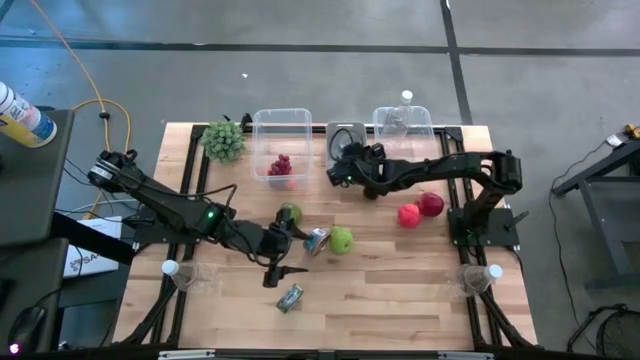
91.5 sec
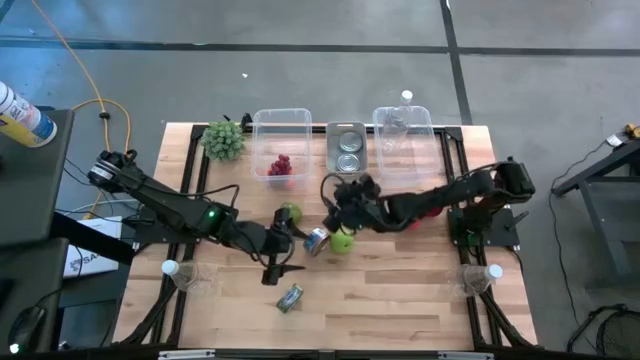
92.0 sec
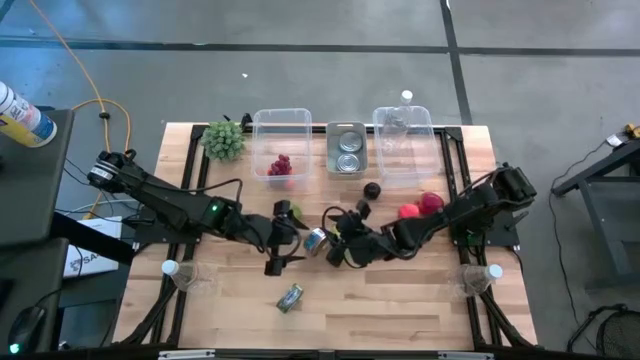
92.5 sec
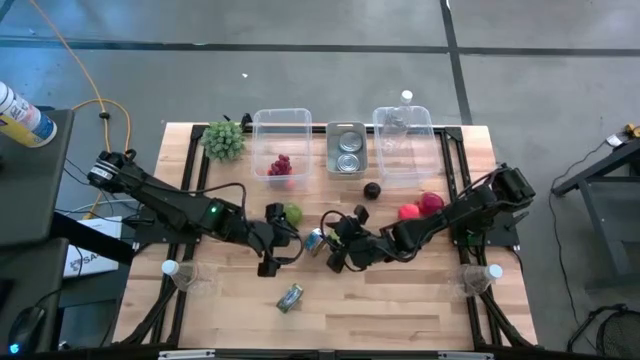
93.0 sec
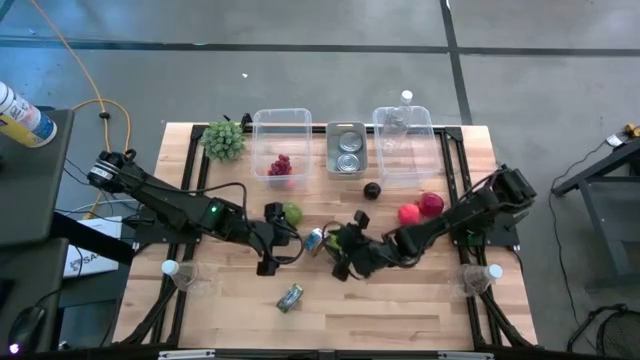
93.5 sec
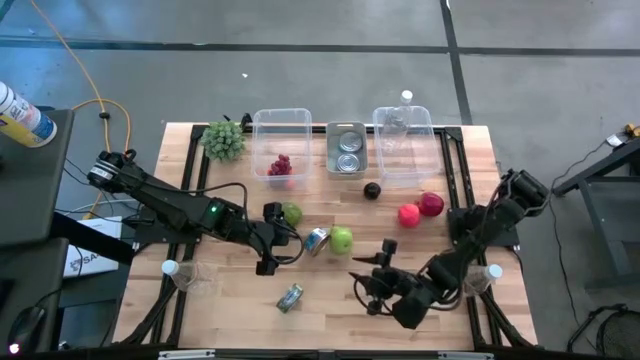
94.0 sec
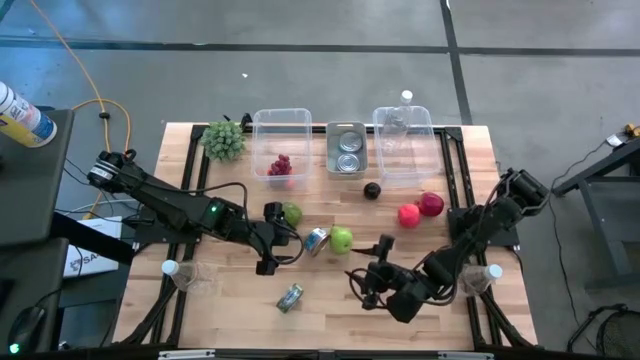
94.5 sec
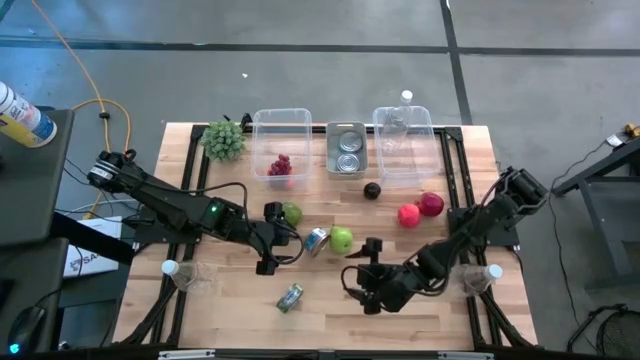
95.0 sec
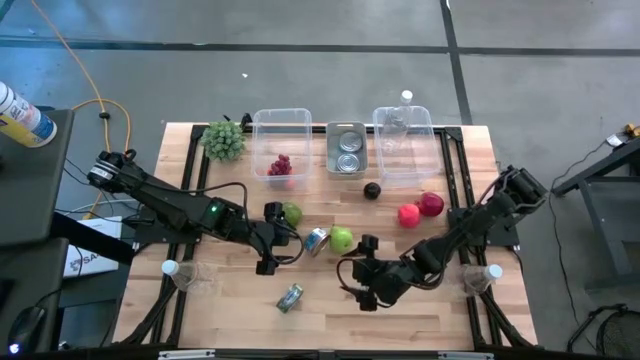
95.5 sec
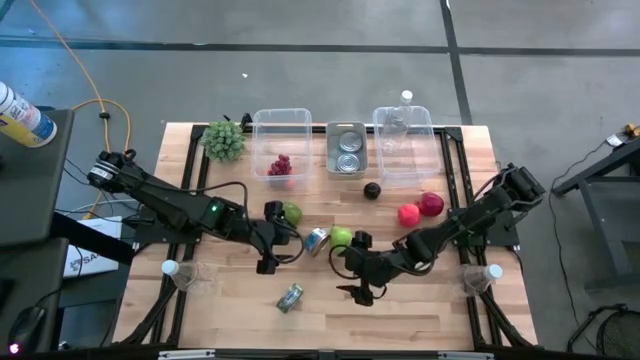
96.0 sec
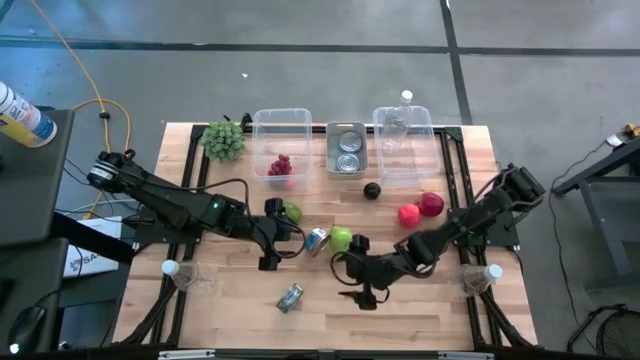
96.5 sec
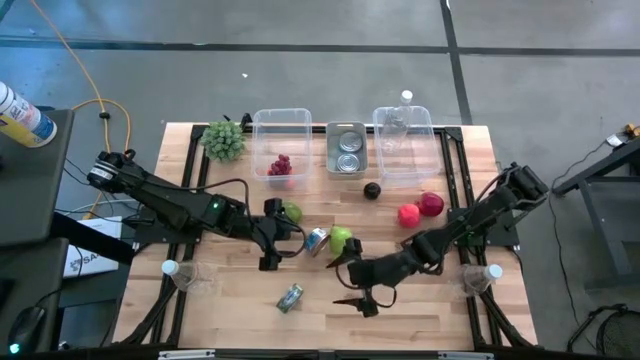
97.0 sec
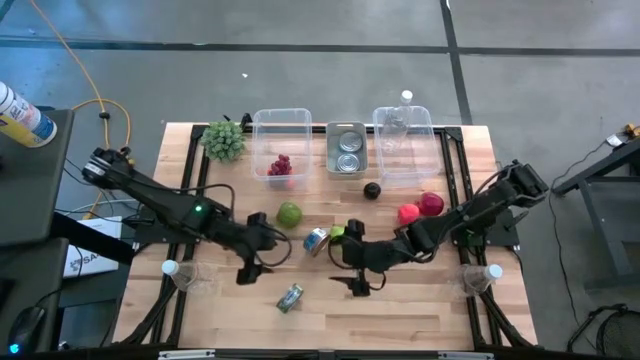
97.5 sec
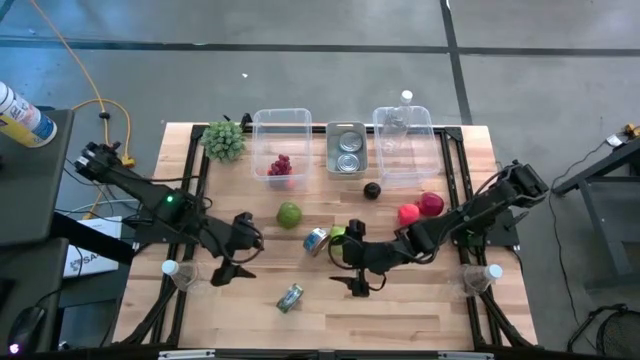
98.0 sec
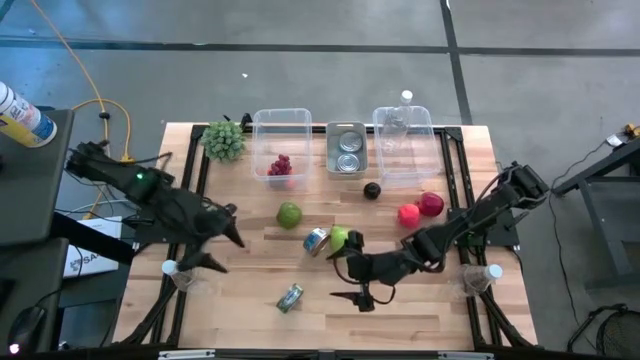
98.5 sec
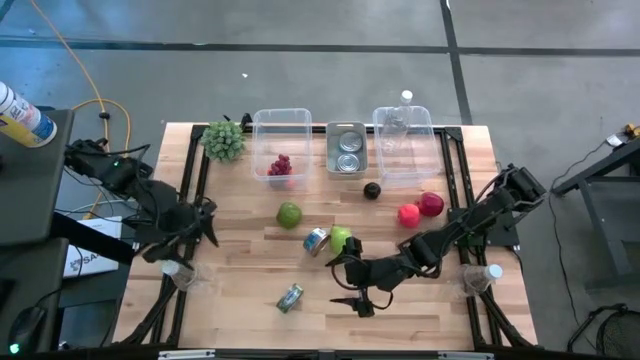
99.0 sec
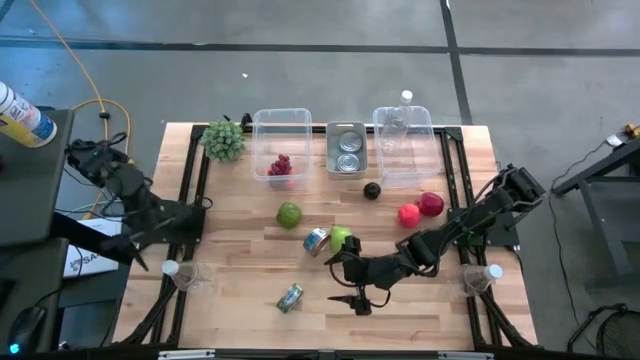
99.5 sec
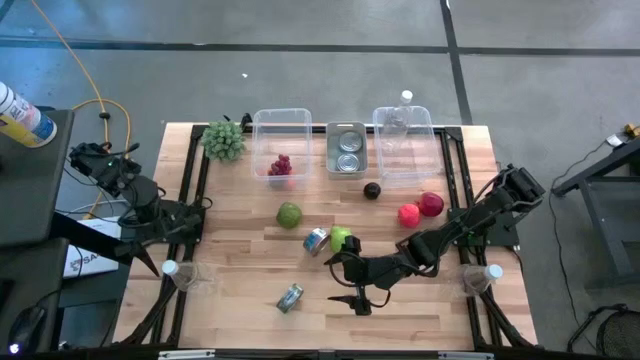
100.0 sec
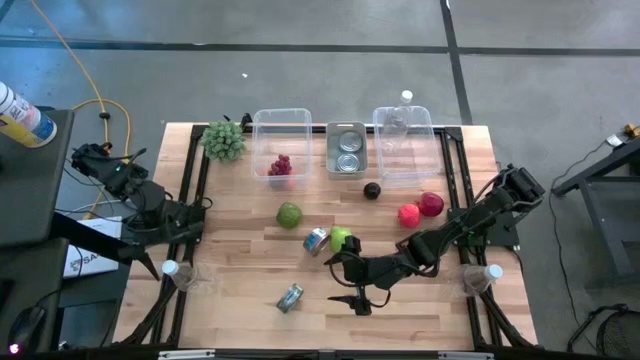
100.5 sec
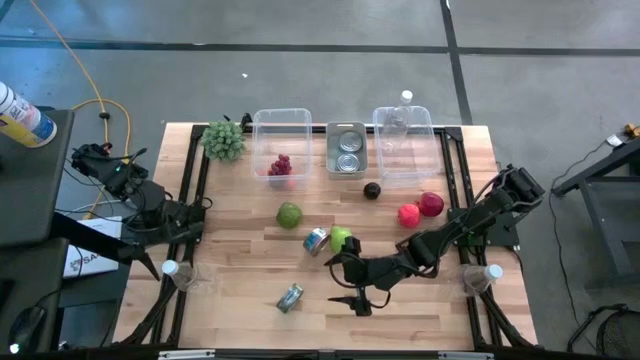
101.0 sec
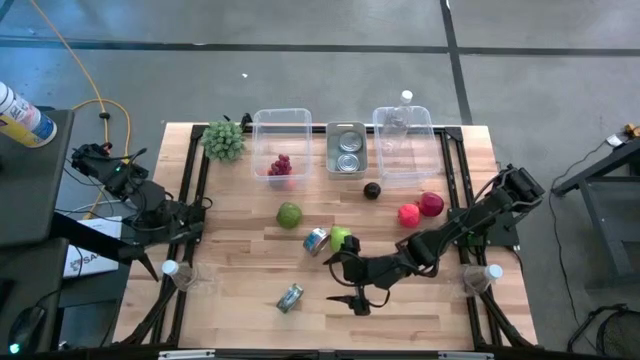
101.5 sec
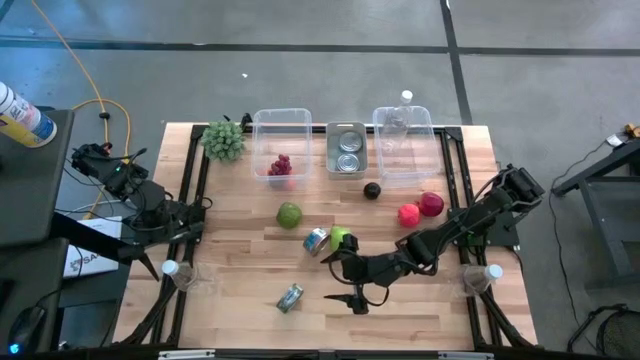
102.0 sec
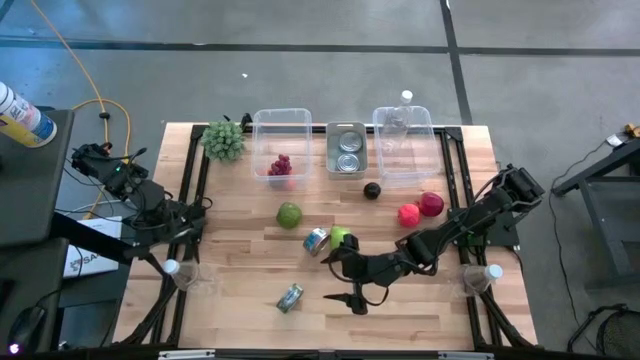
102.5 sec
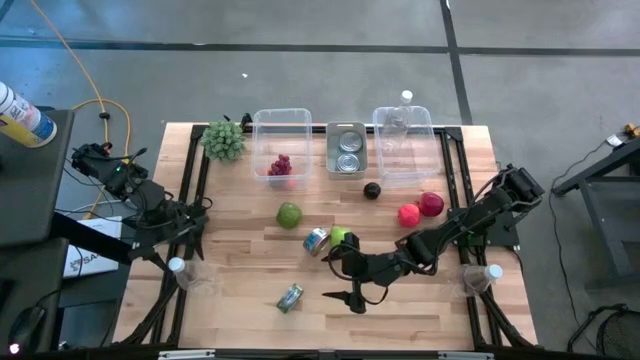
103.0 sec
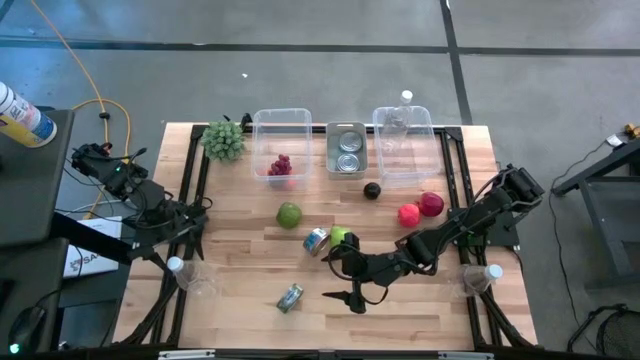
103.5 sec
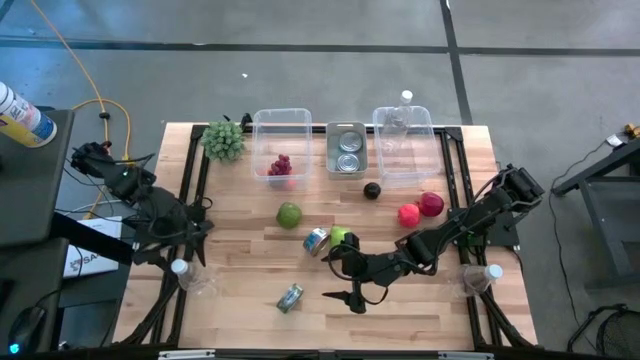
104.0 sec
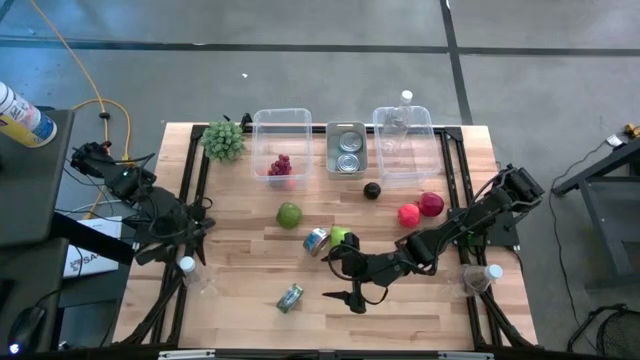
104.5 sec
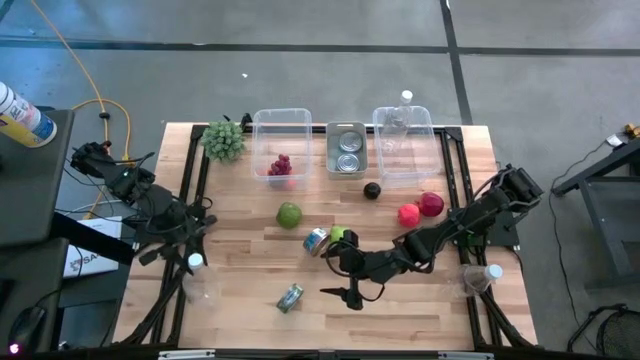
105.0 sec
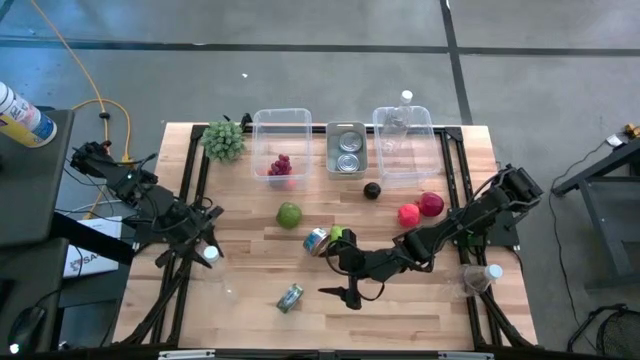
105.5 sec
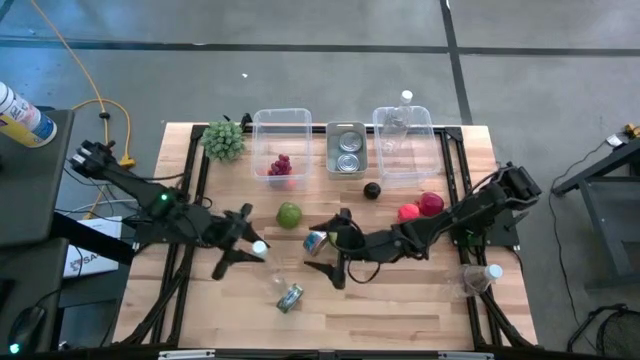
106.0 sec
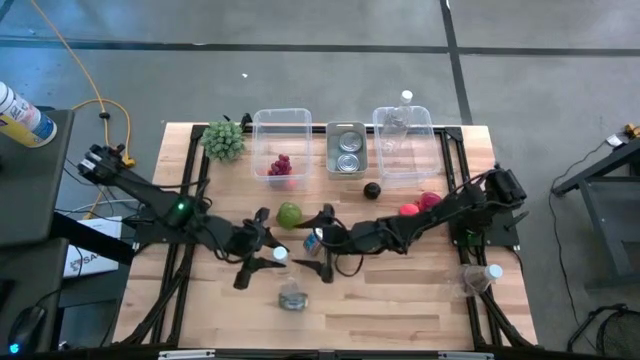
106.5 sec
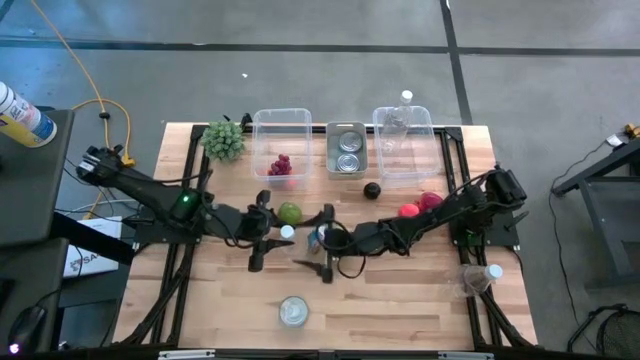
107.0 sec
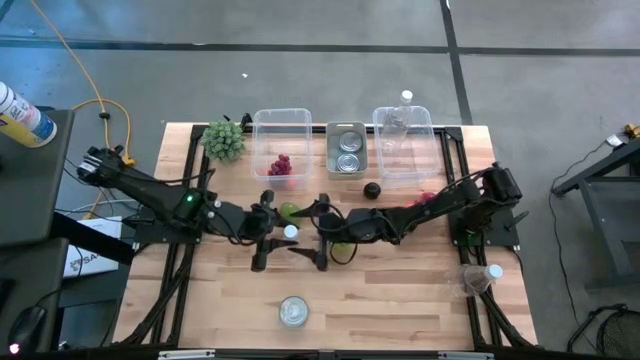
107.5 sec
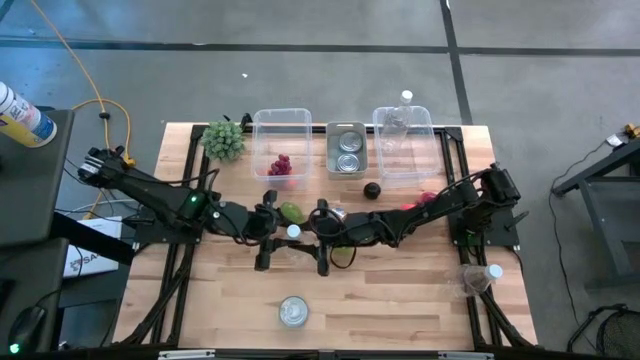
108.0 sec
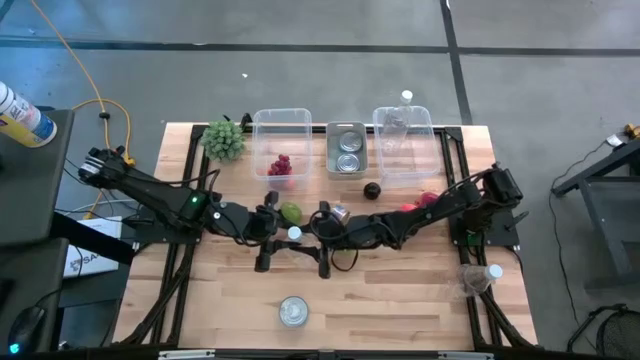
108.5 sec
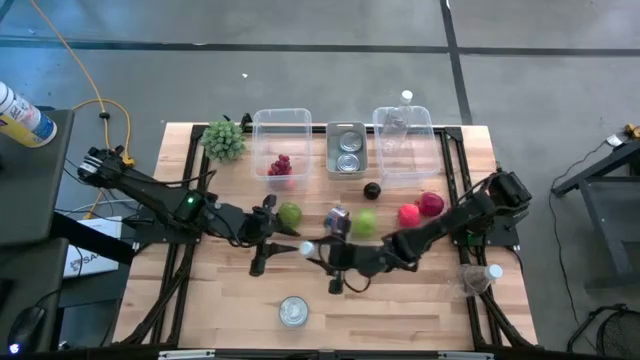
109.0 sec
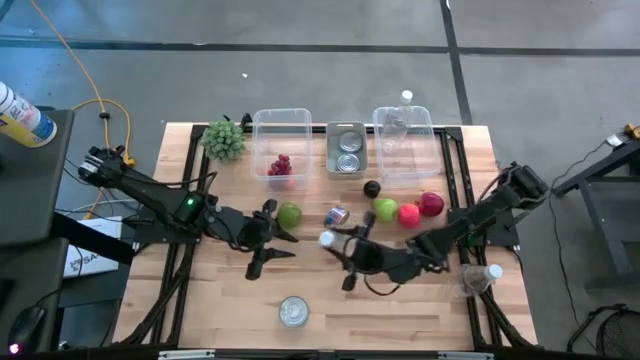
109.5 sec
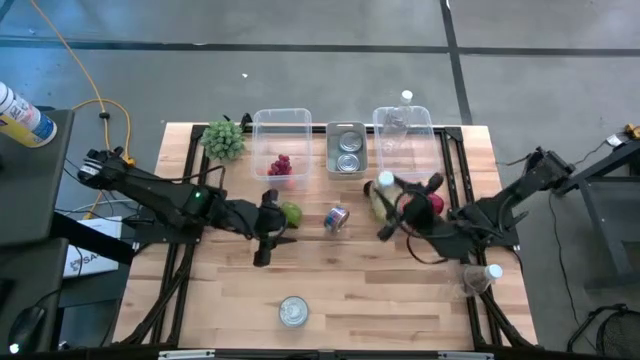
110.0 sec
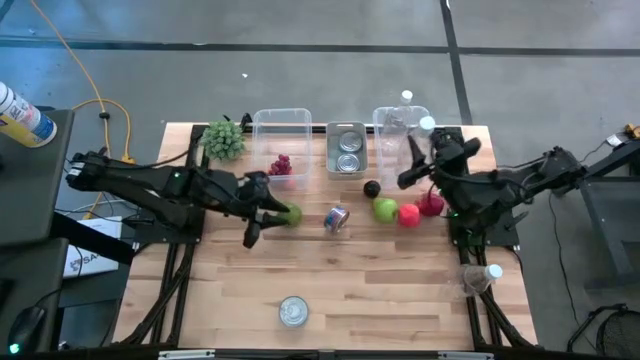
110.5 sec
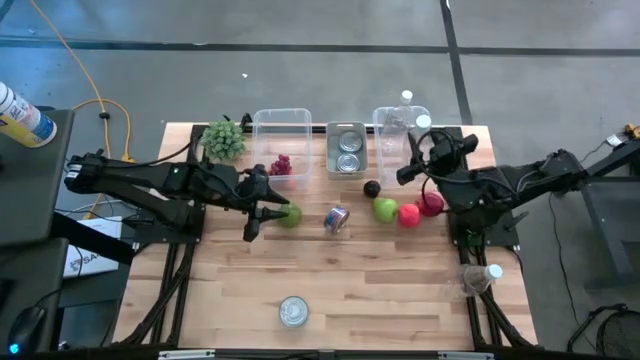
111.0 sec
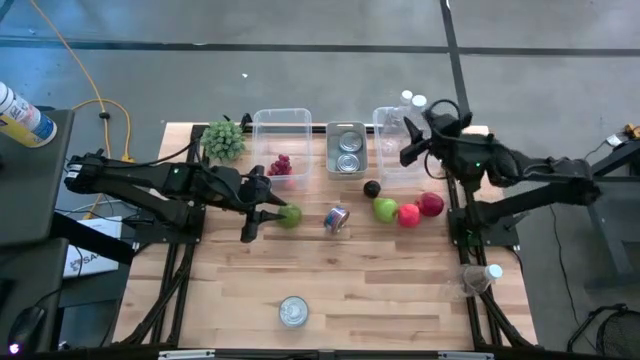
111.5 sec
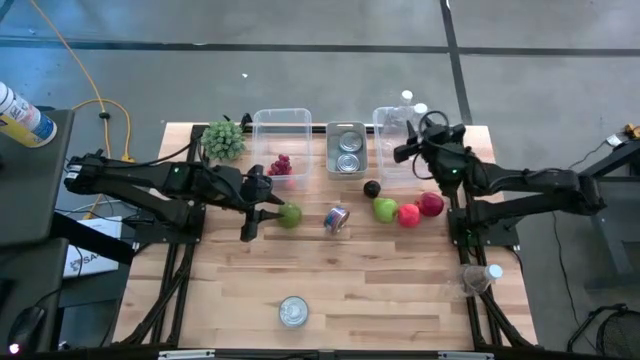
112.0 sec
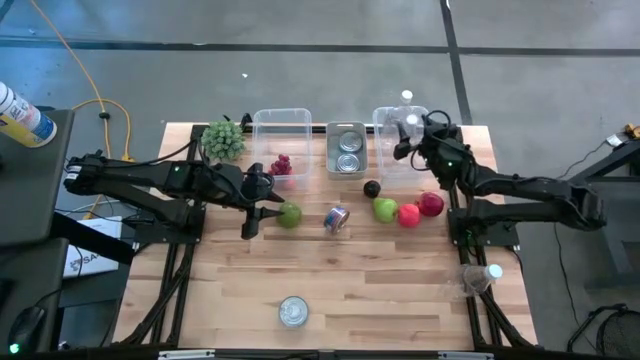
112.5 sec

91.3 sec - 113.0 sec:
Task: Pick & Place Food Item
Put the empty water bottle into the right transparent bin
